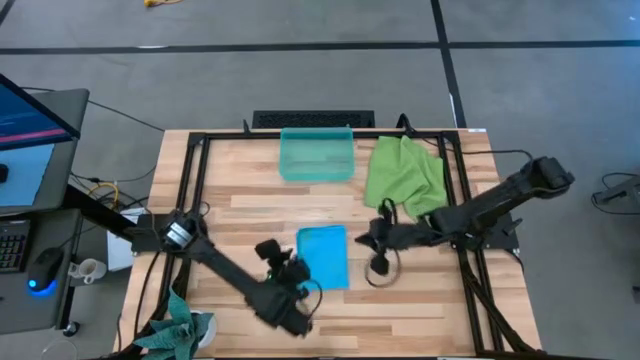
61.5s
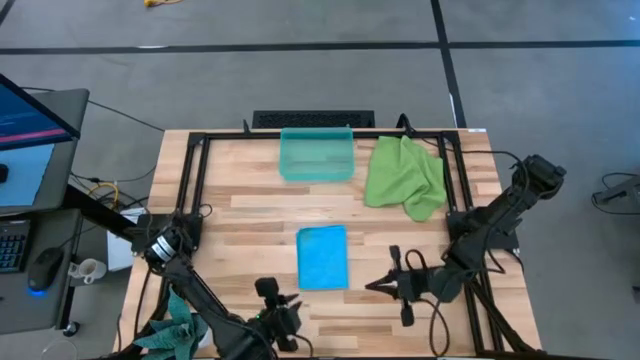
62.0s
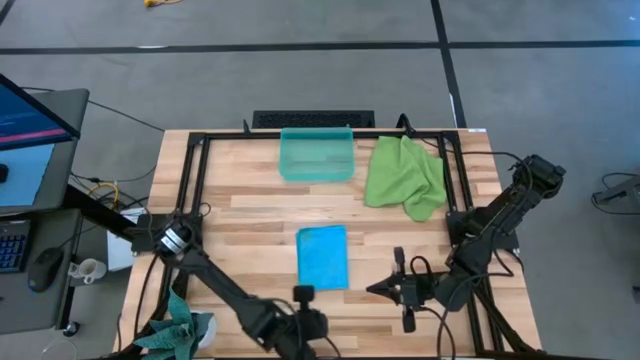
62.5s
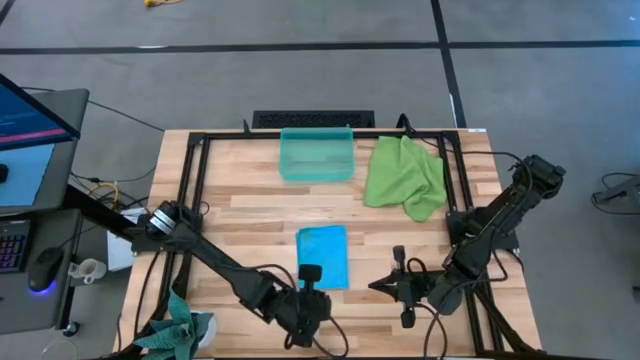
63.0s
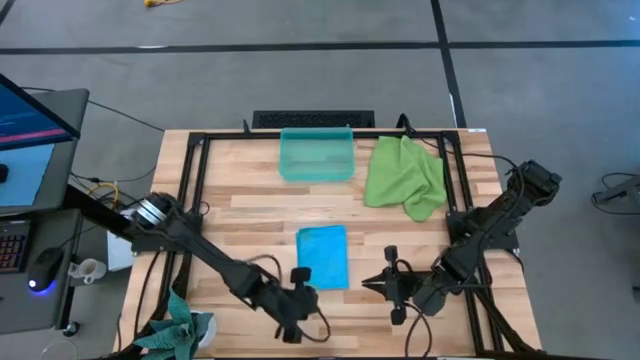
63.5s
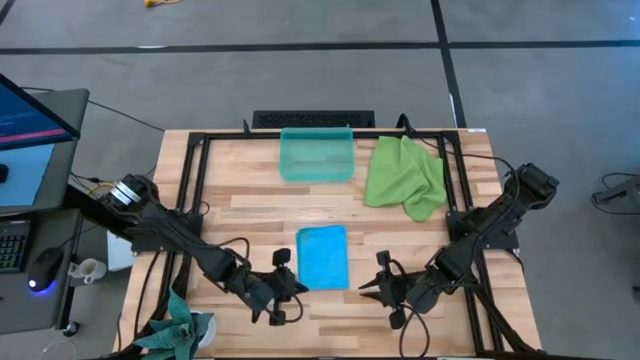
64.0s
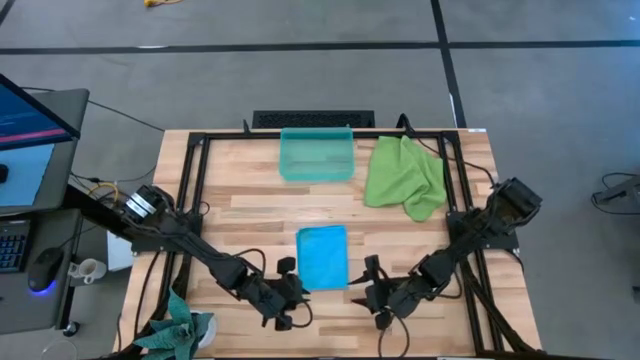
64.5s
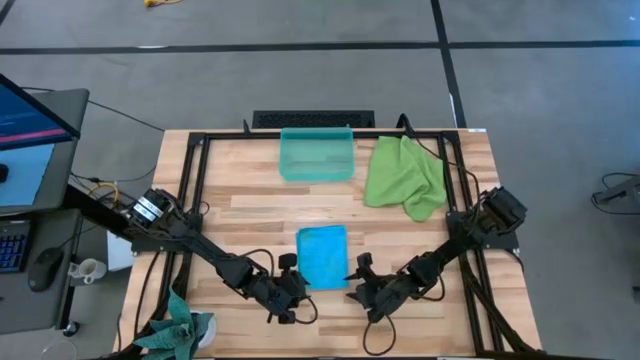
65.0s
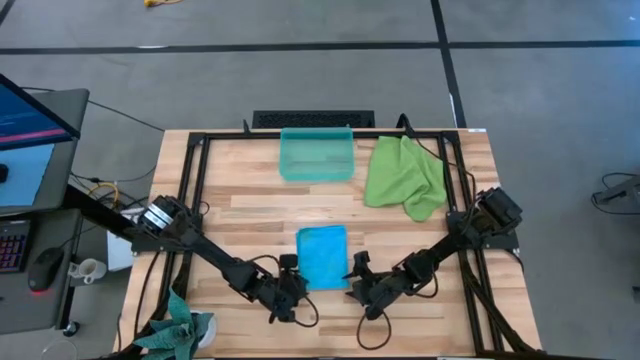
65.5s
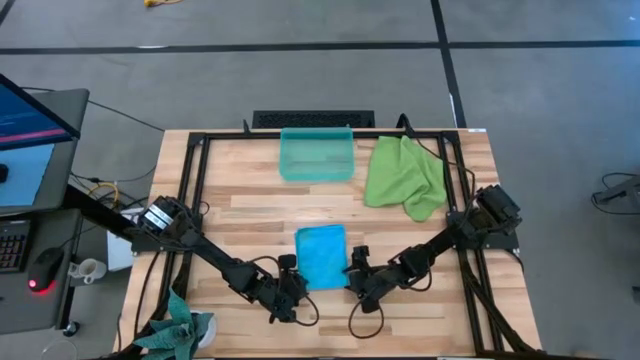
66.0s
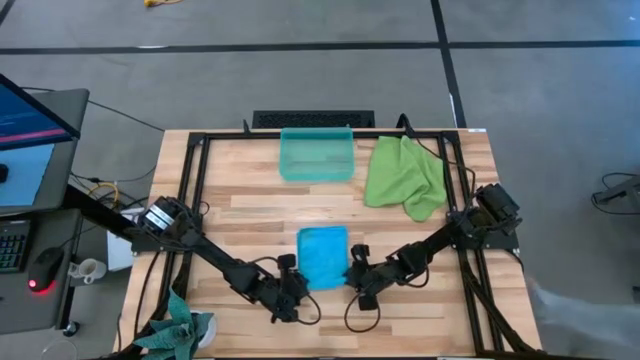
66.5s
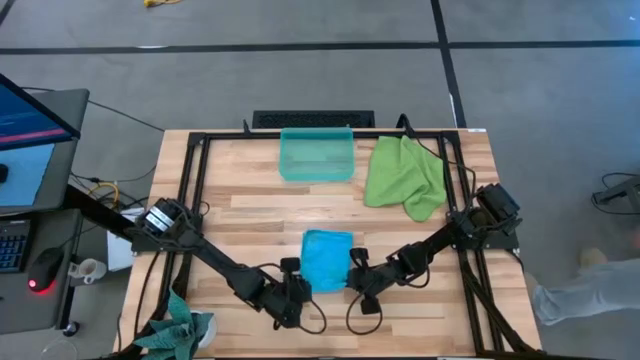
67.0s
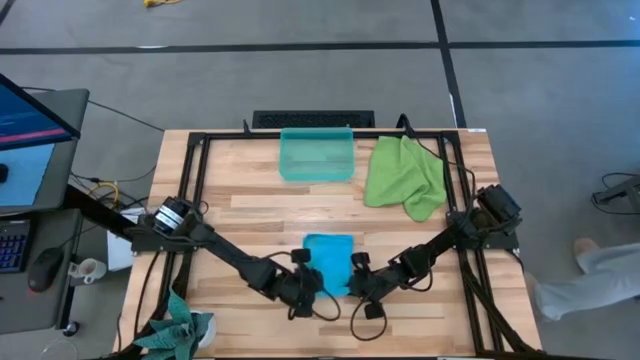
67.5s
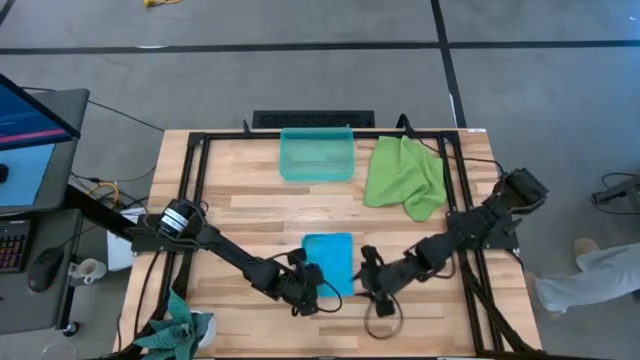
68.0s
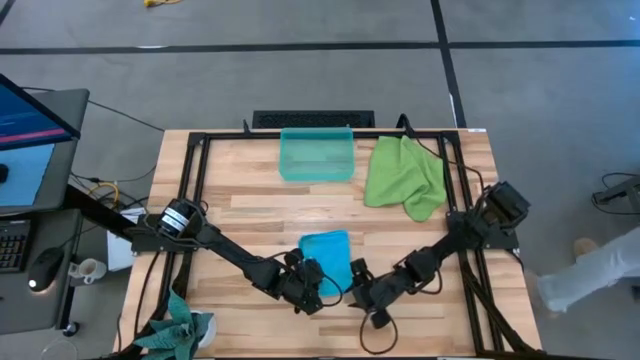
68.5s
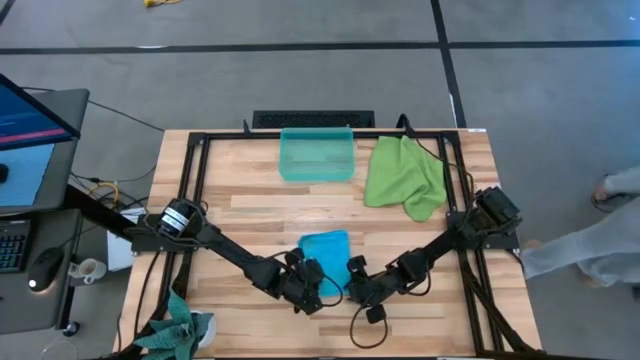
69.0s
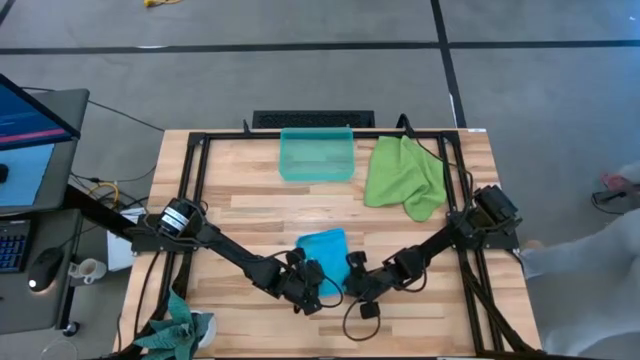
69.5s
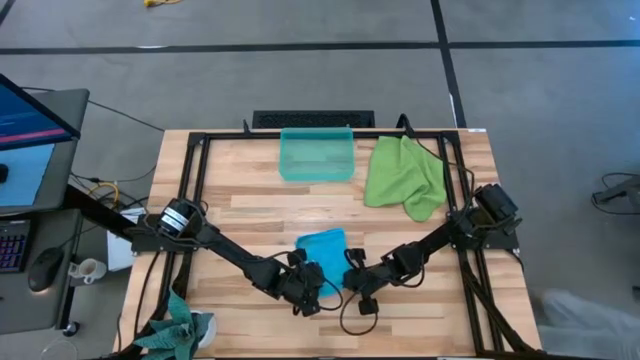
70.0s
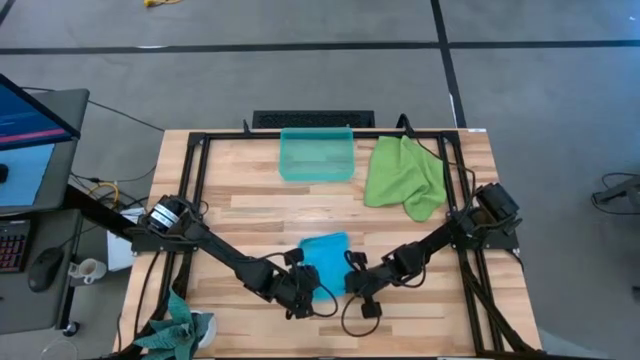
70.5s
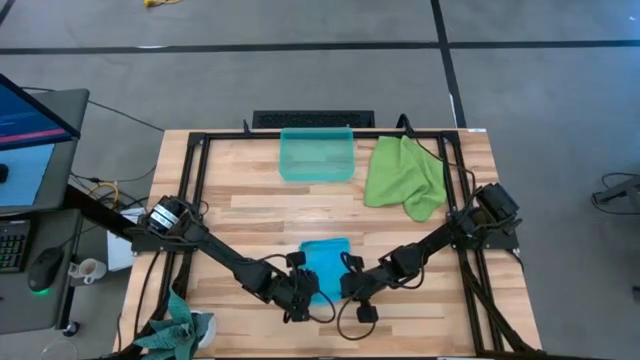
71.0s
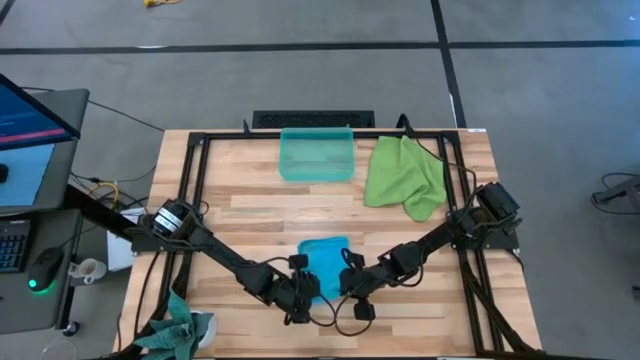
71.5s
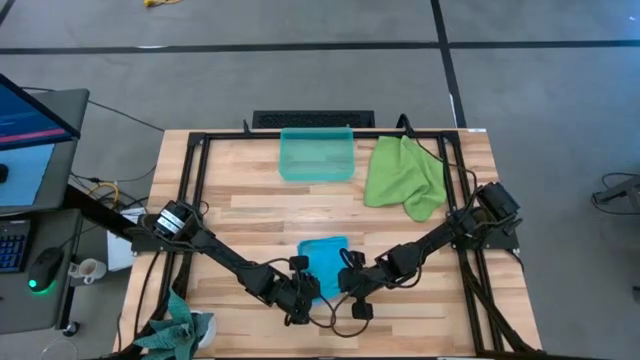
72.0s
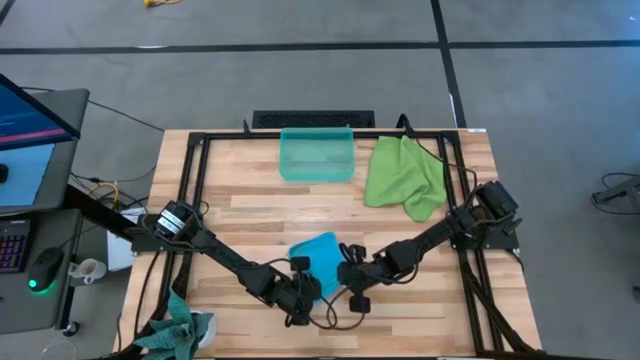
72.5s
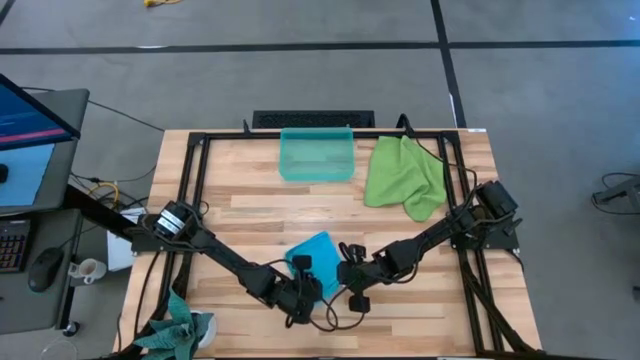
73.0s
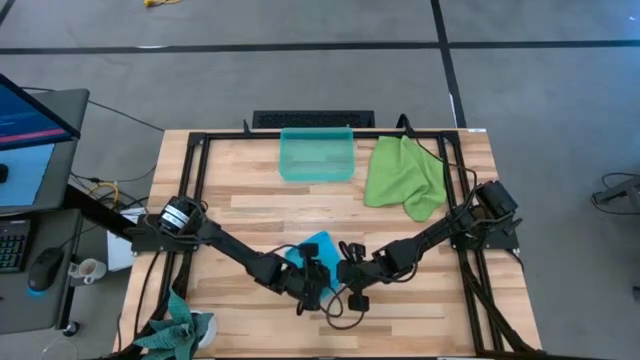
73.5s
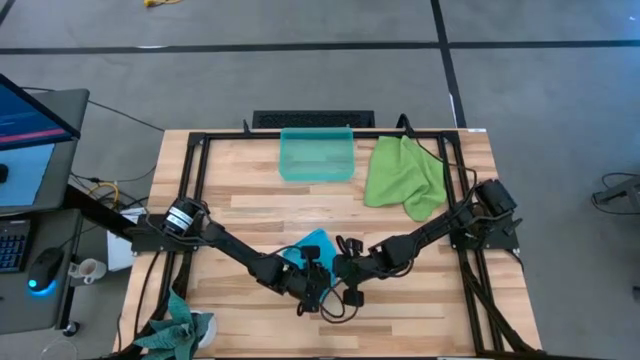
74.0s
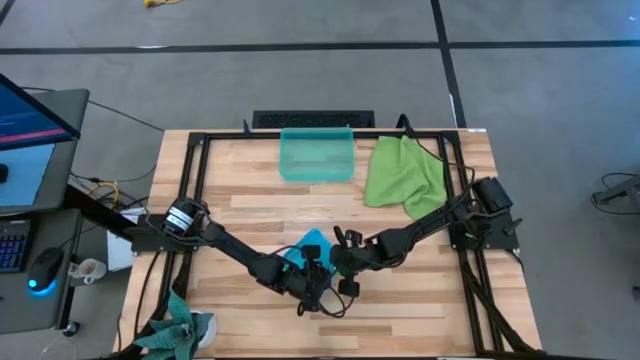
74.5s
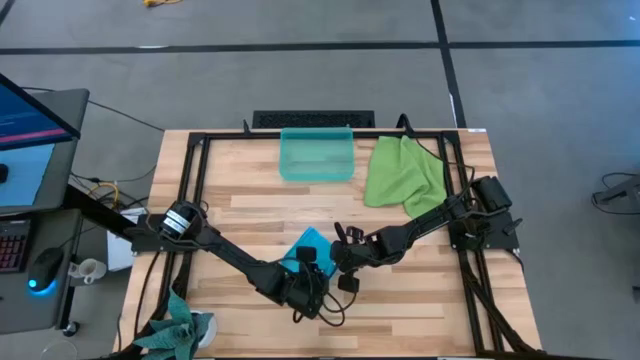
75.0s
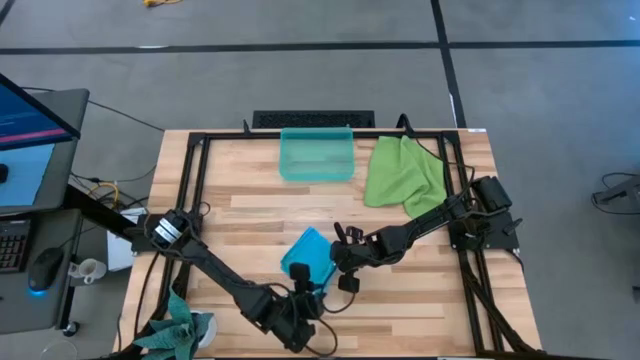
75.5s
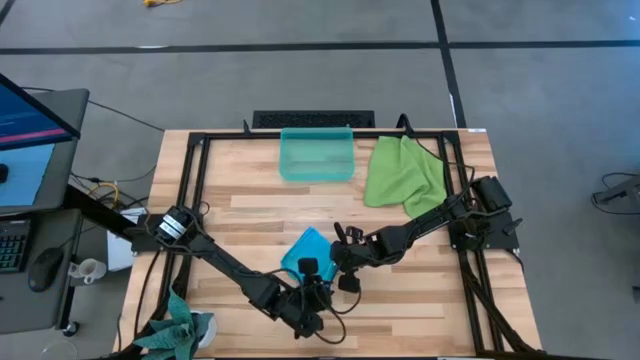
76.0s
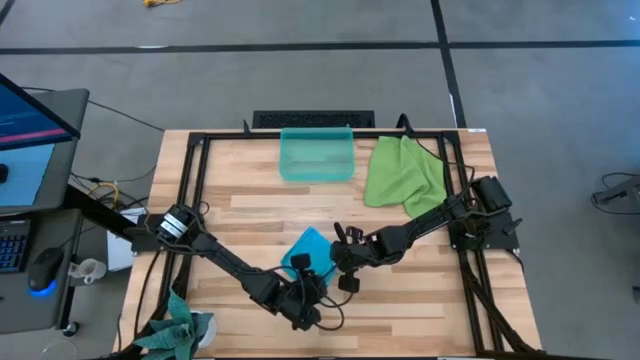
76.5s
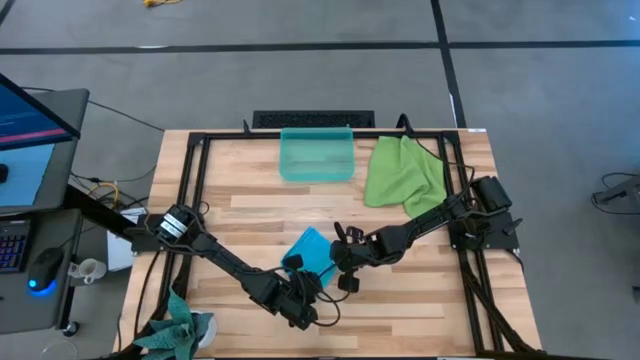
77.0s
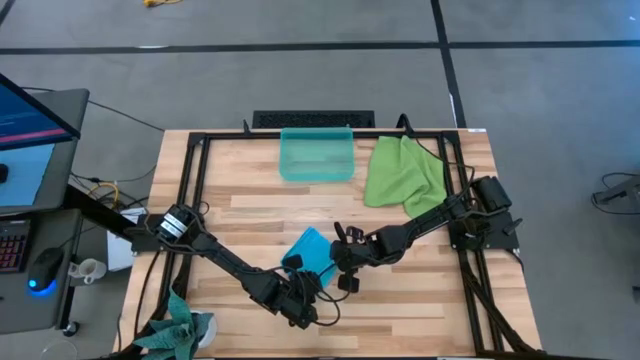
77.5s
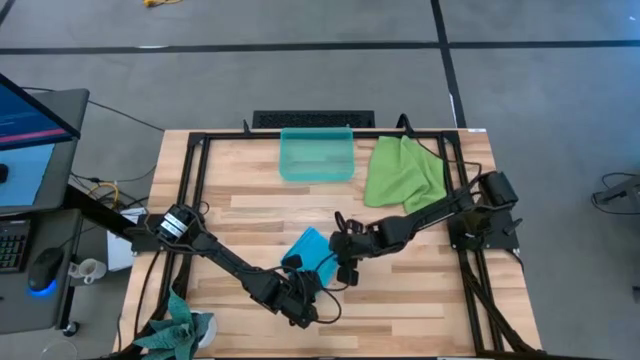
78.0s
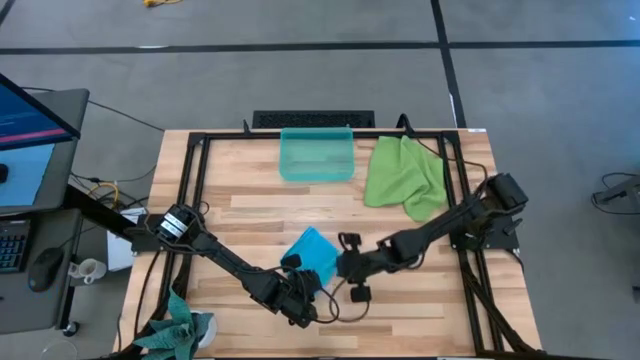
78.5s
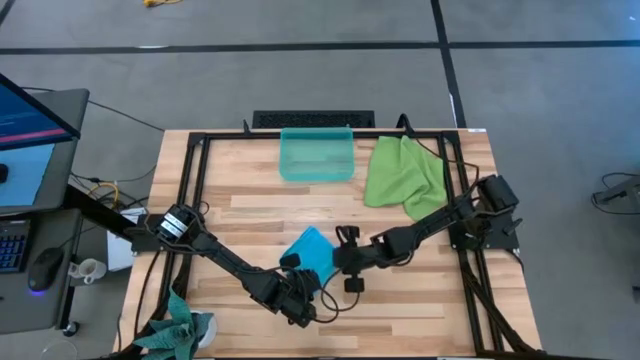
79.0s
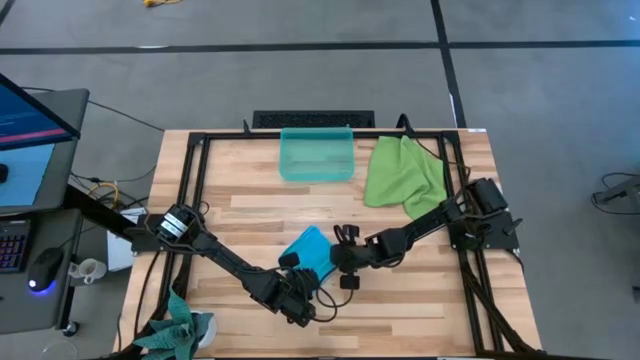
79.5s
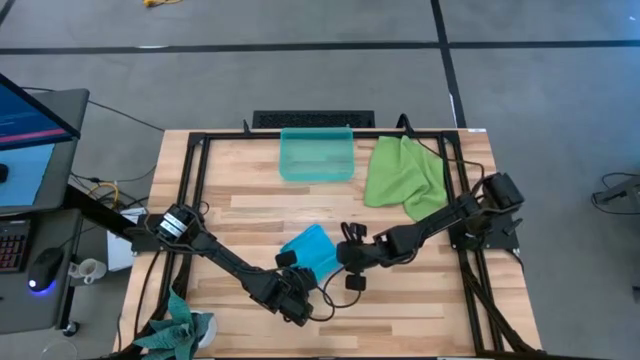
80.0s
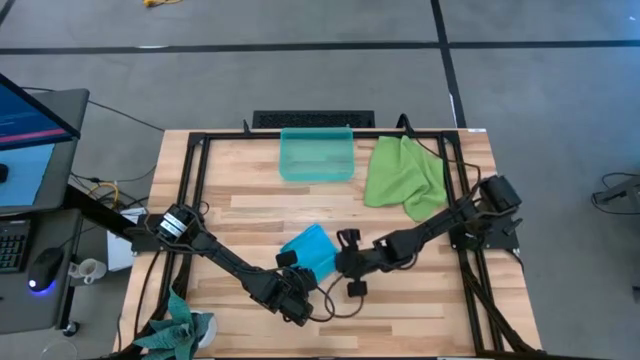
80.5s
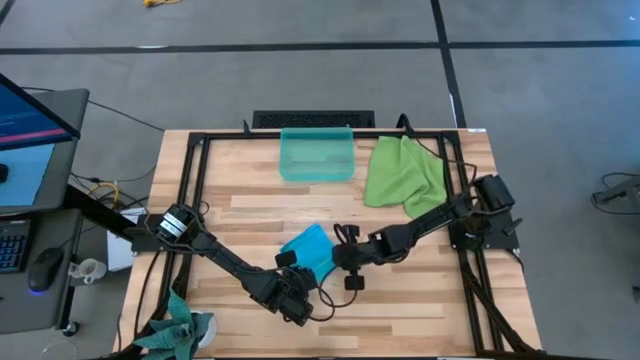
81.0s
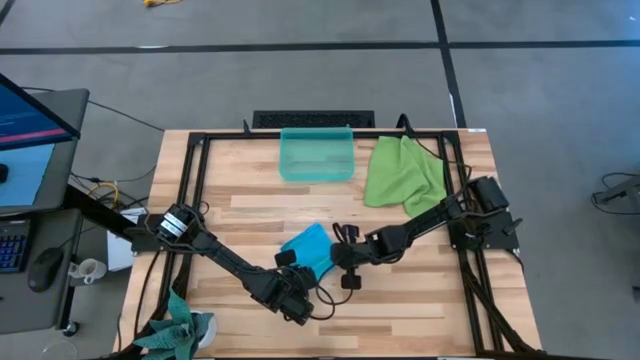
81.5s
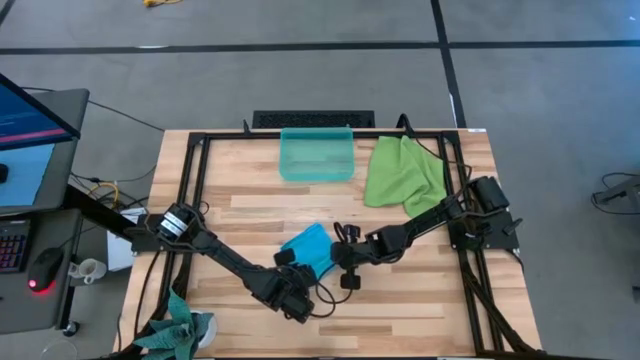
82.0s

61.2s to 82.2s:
Task: Roll microfiber towels into tight, uniform cylinder then place into a basket
Roll the blue microfiber cloth
